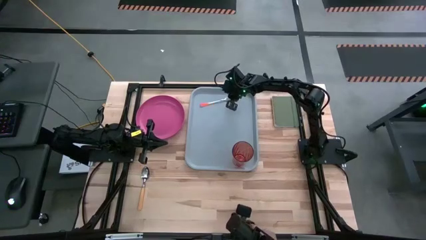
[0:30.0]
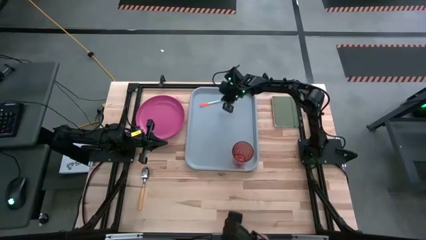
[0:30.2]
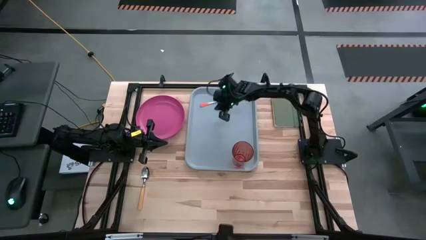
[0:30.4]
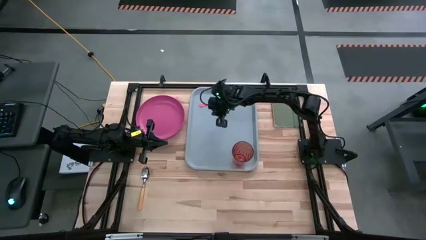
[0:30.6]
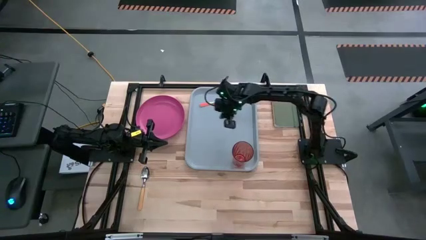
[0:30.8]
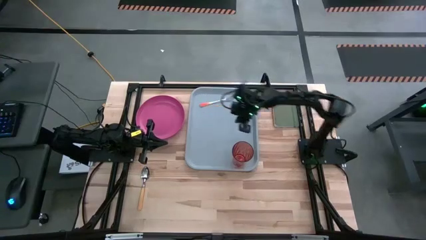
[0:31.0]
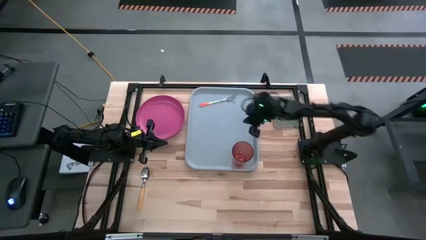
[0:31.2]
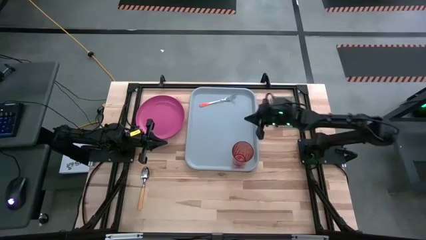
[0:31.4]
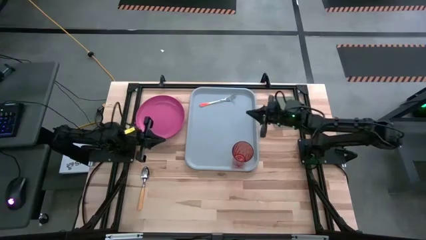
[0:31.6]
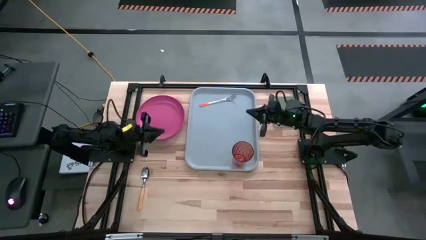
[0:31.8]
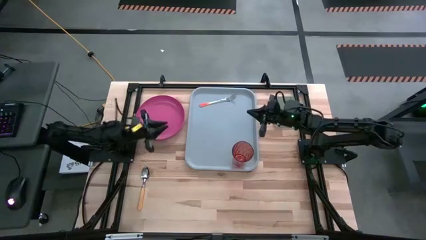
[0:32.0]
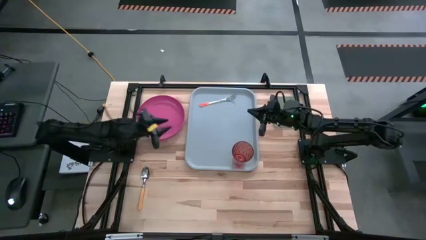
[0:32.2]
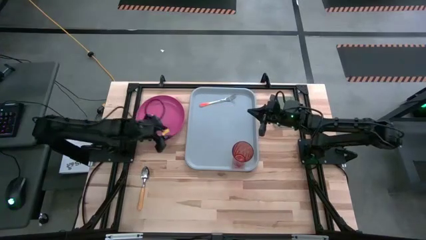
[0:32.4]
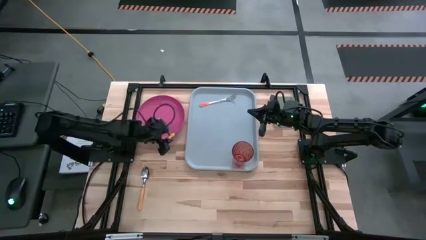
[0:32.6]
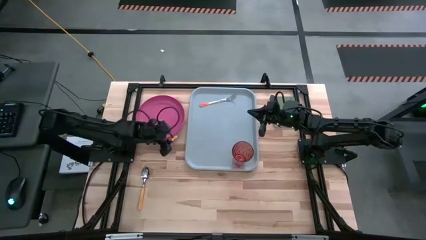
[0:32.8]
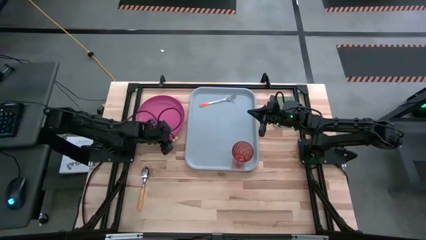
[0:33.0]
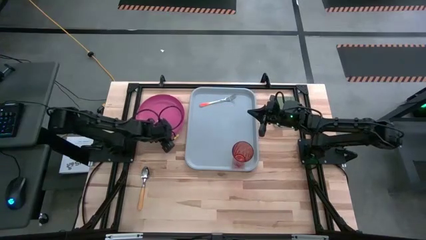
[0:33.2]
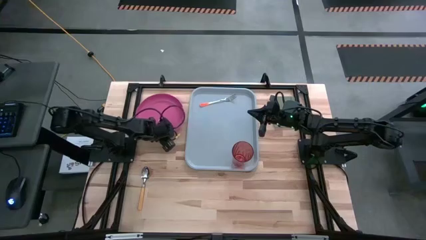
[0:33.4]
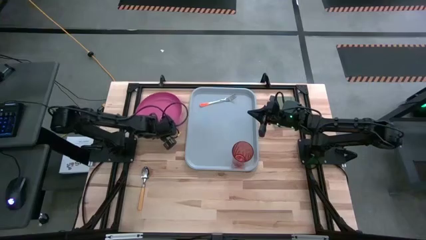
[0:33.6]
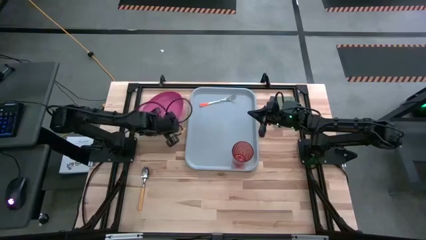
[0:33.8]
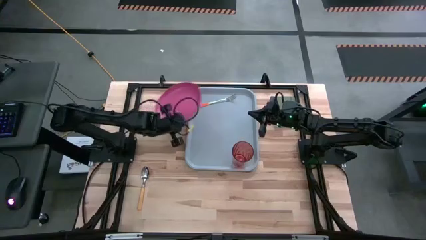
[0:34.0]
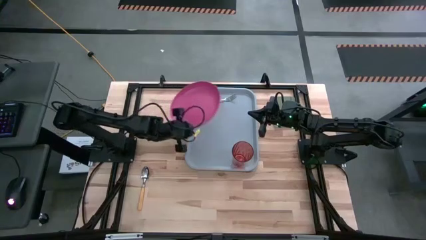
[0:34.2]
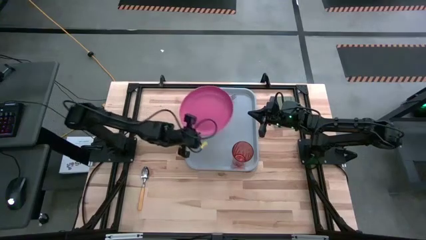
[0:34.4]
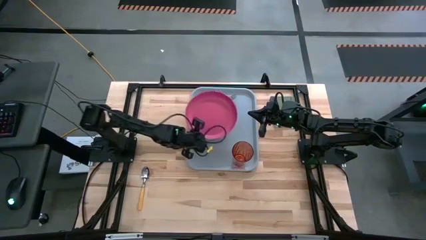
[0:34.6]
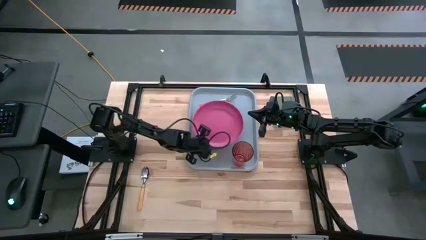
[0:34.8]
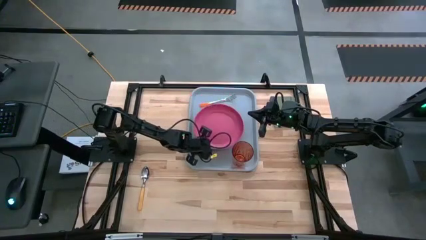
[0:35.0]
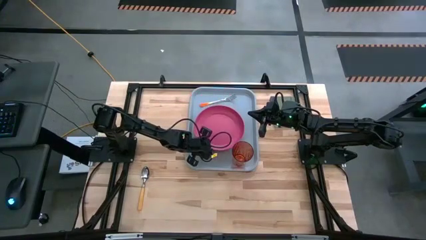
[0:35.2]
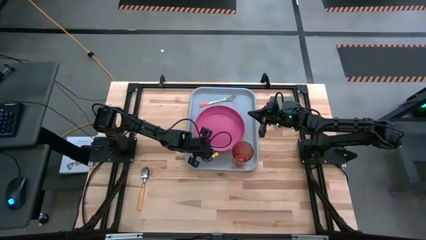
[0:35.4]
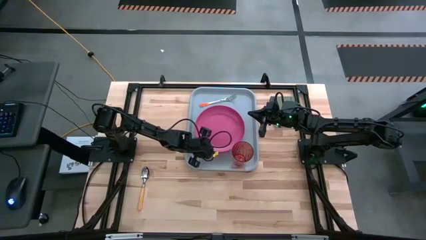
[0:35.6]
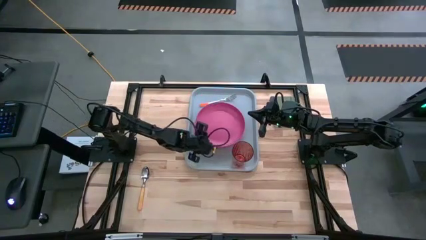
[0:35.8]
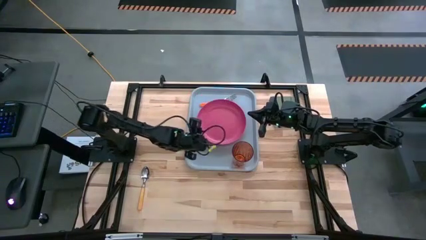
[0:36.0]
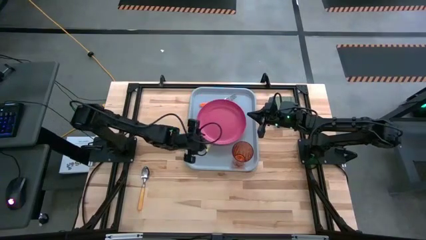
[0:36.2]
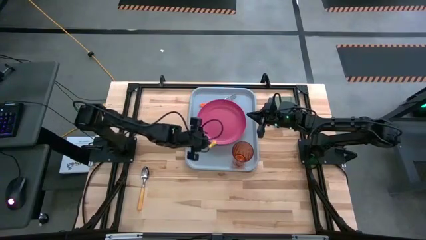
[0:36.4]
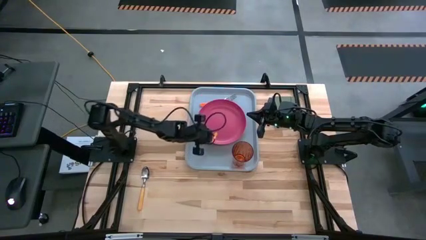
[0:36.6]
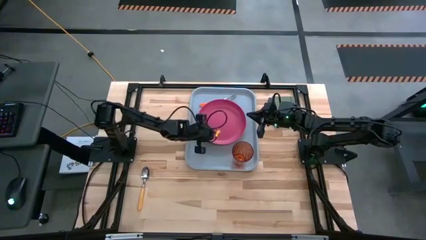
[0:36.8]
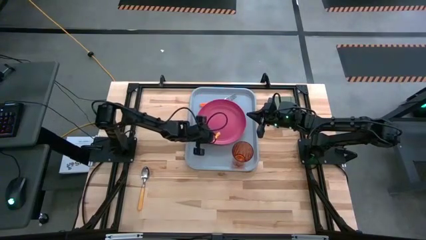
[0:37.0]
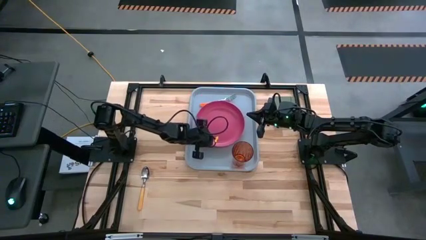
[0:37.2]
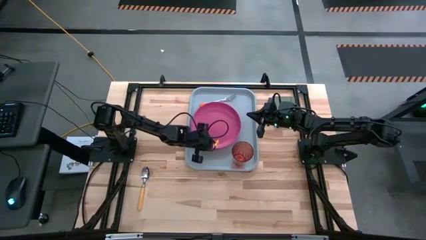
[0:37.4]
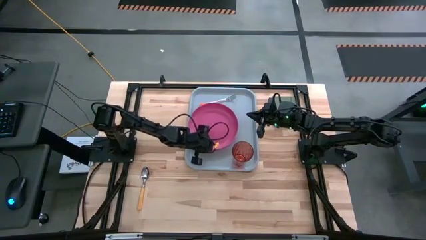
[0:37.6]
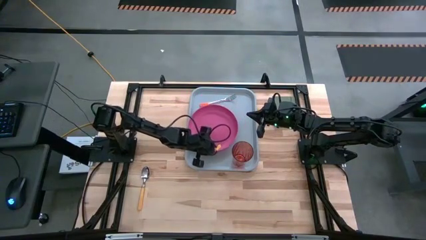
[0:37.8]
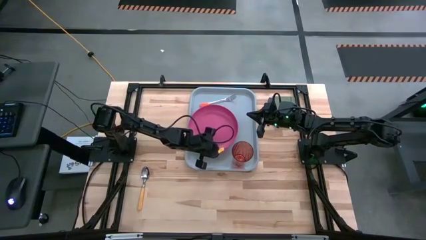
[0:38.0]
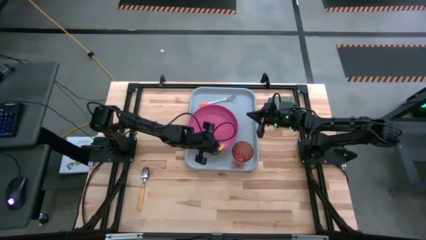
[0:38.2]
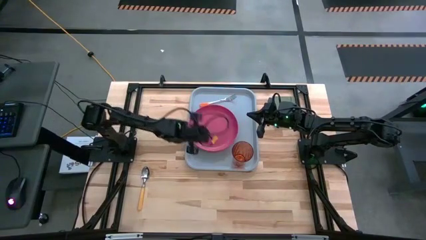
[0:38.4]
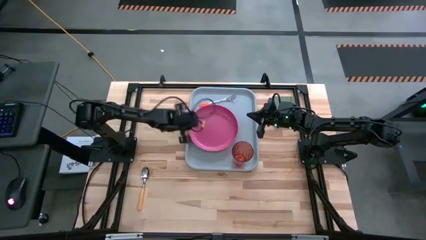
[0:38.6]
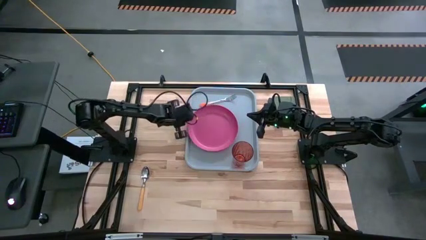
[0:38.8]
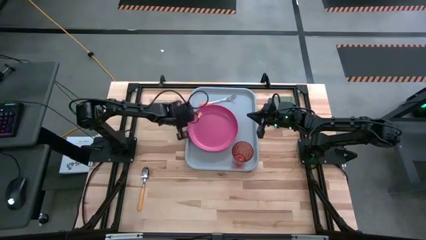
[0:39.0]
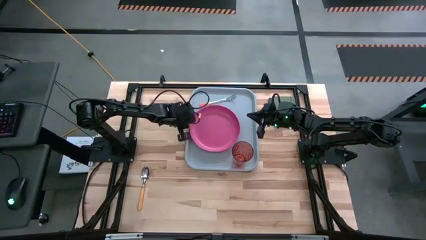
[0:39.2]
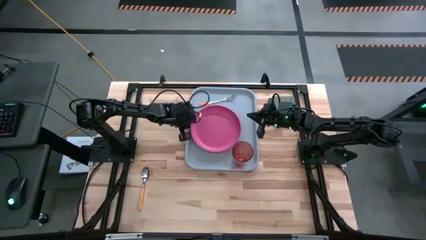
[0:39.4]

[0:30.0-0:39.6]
Task: Pick and place plate/cup/fork/spoon on tray
Put the pink plate on the gray serving tray to the bottom of the orange glass
